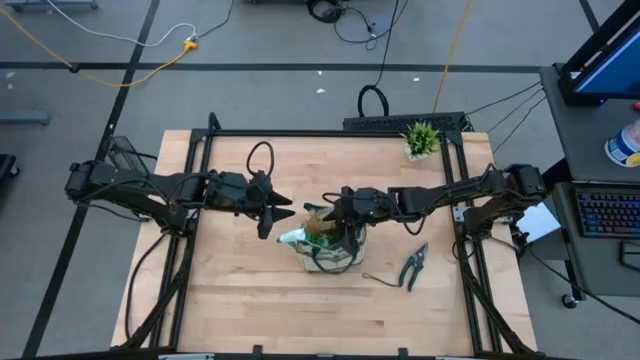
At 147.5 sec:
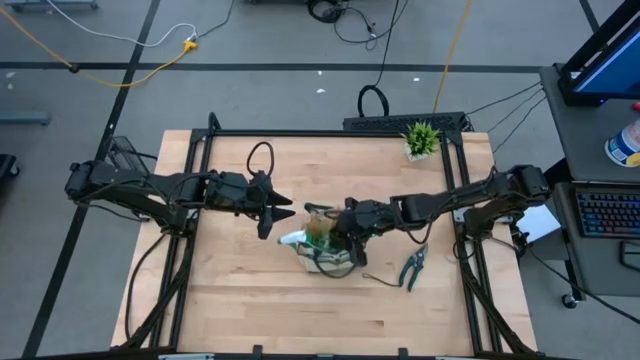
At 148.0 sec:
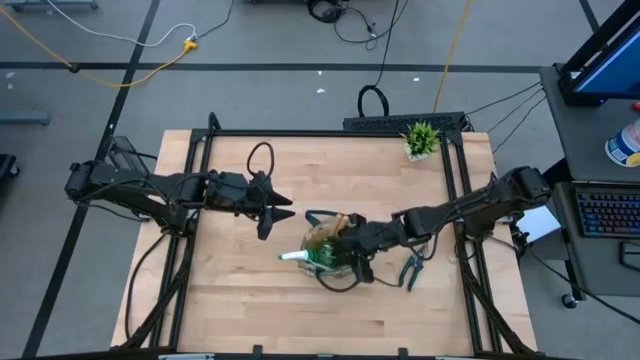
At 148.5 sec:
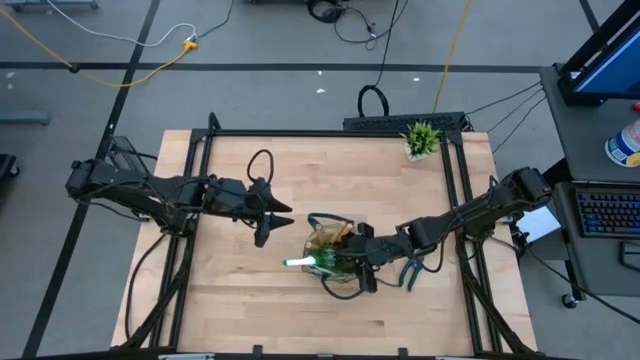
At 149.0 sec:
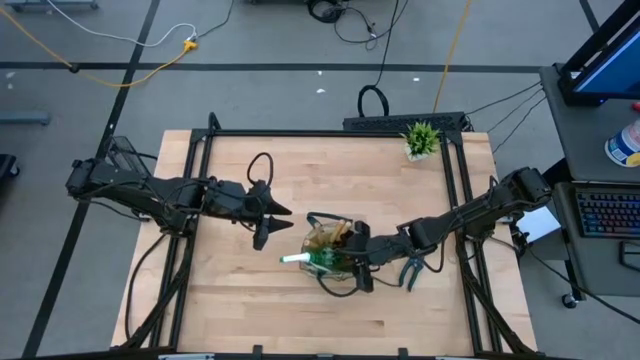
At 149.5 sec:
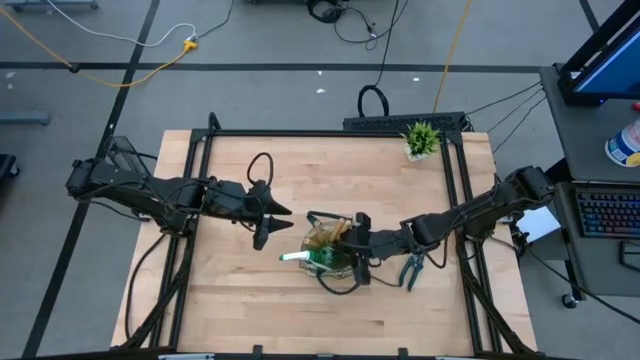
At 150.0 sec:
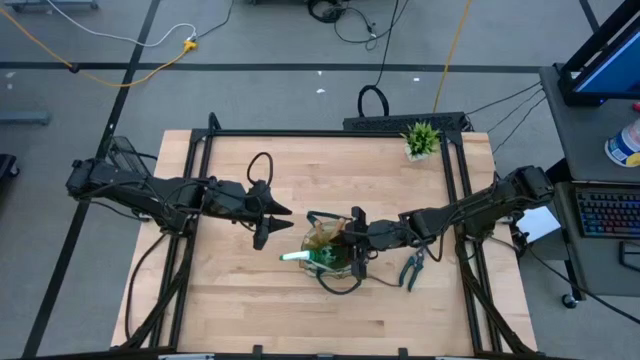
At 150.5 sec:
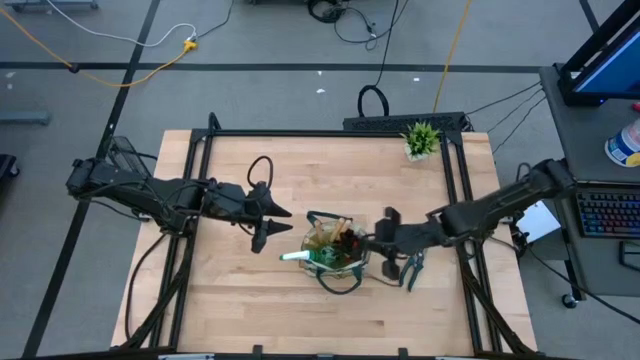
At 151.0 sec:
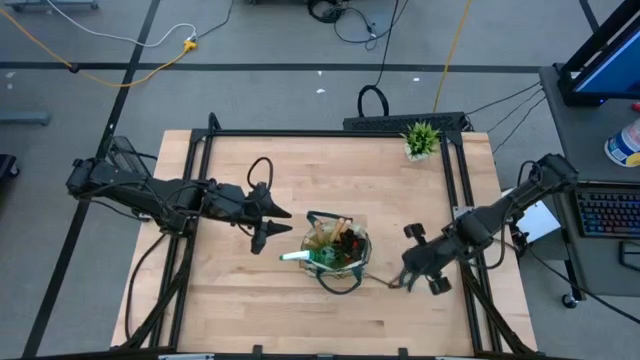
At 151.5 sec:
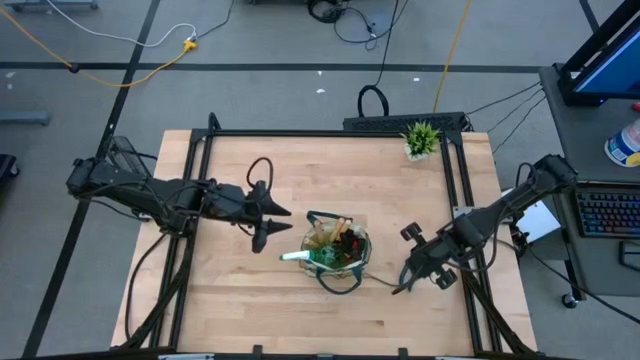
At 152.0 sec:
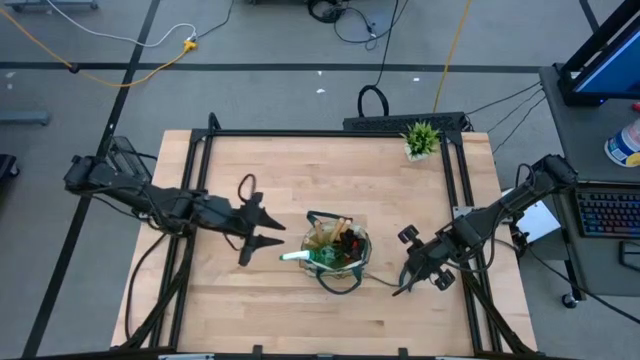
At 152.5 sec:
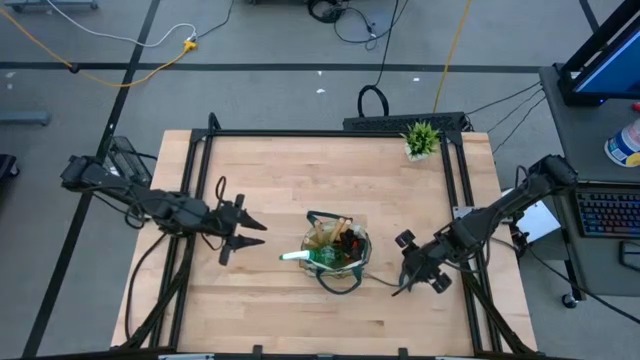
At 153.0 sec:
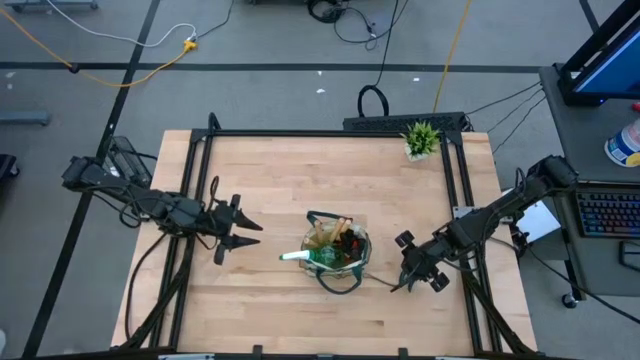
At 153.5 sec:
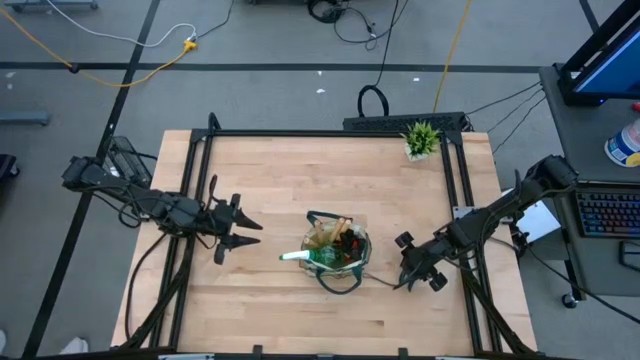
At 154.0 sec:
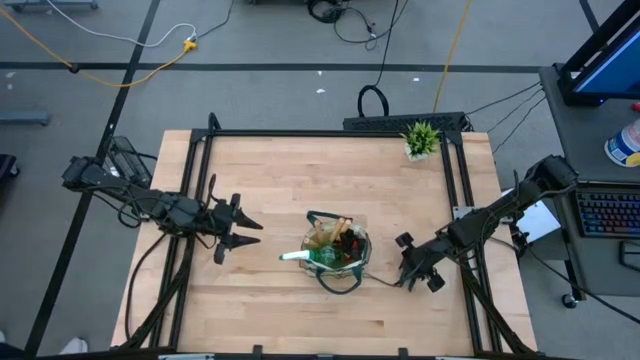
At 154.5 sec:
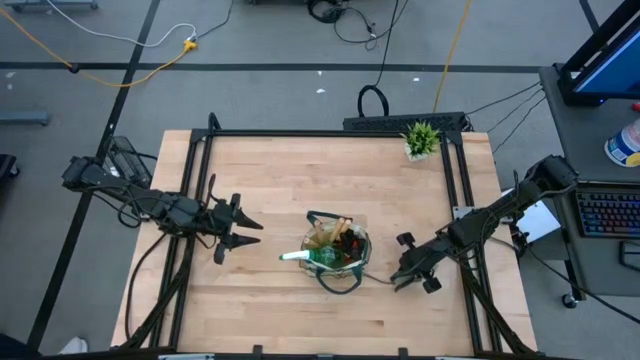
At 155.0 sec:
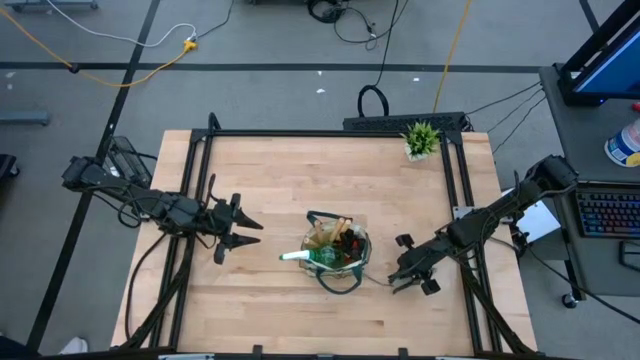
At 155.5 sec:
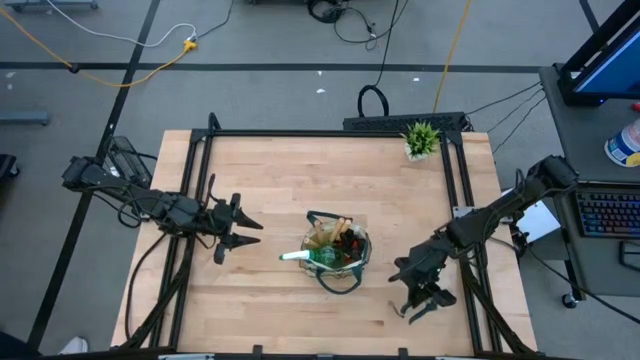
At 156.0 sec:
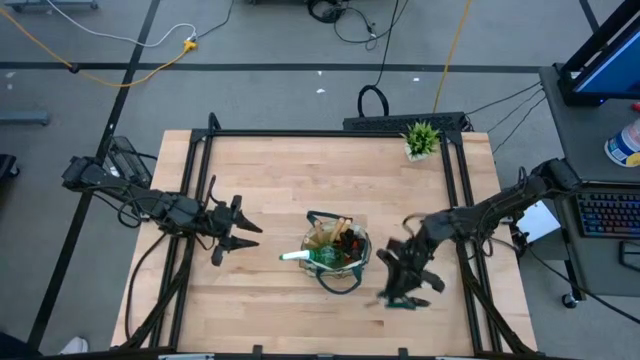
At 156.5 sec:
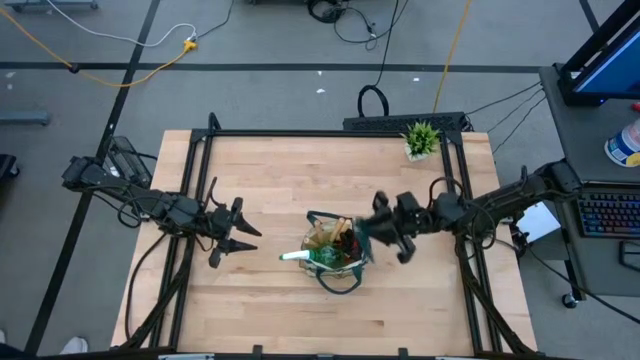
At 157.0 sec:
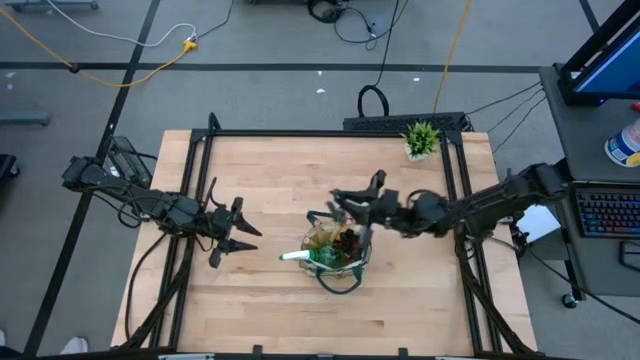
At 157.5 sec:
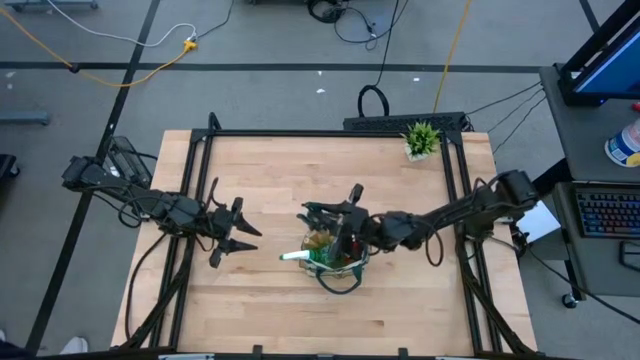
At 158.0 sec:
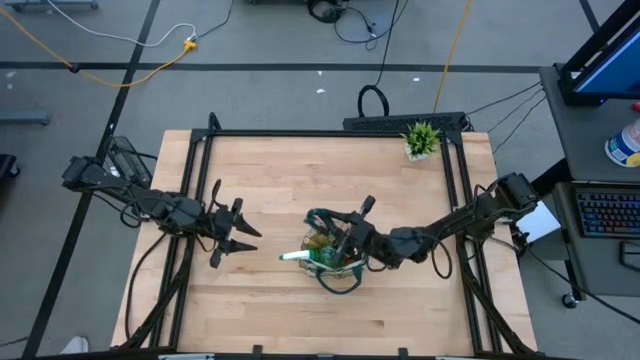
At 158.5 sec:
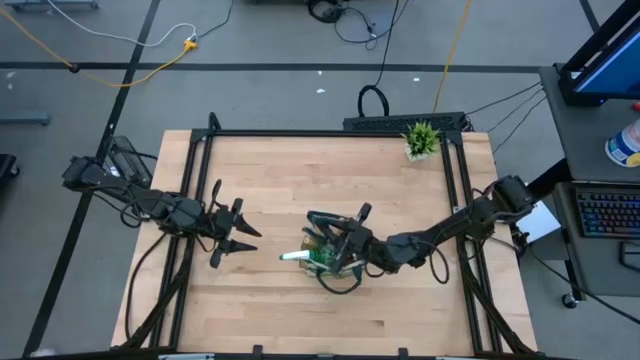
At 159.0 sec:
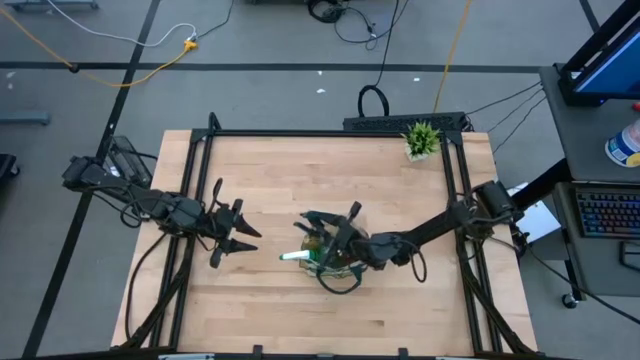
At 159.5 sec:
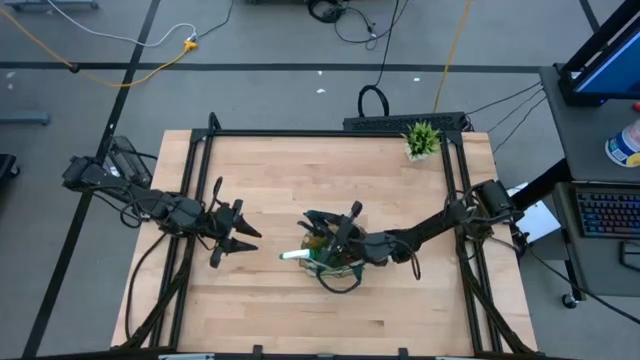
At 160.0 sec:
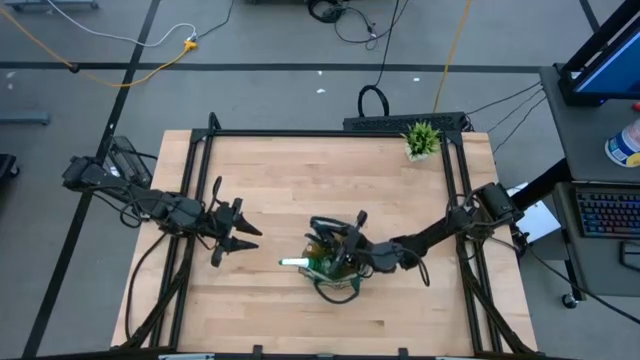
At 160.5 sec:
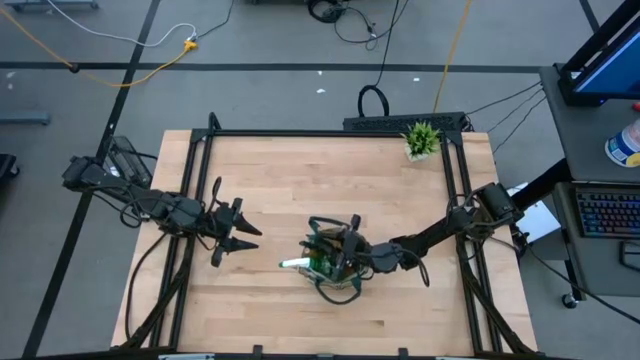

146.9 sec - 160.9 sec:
Task: Pick & Place Garden tools in Gardening bag
Put the shear scissors into the gardening bag

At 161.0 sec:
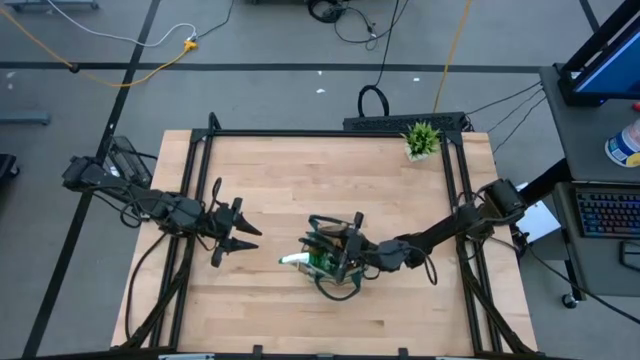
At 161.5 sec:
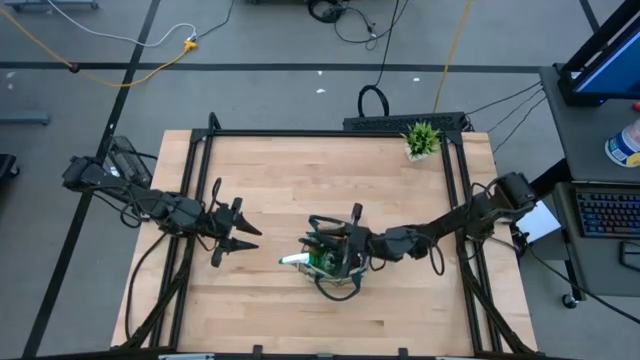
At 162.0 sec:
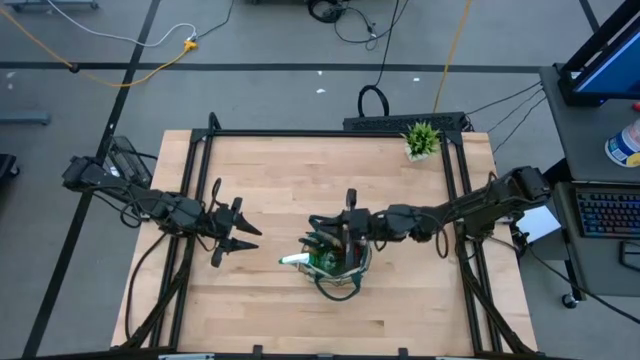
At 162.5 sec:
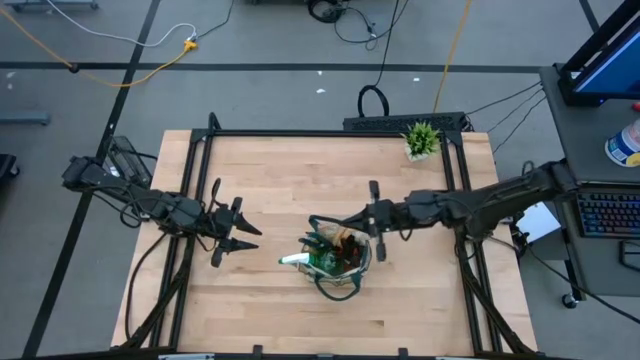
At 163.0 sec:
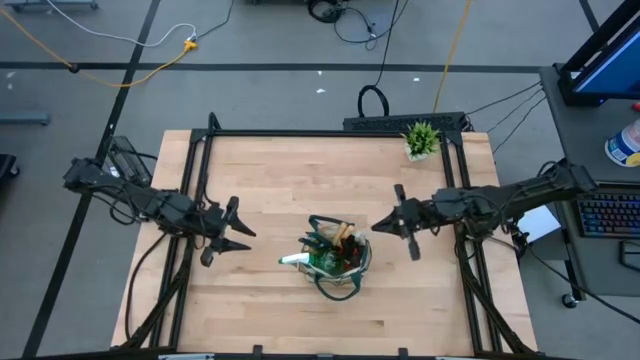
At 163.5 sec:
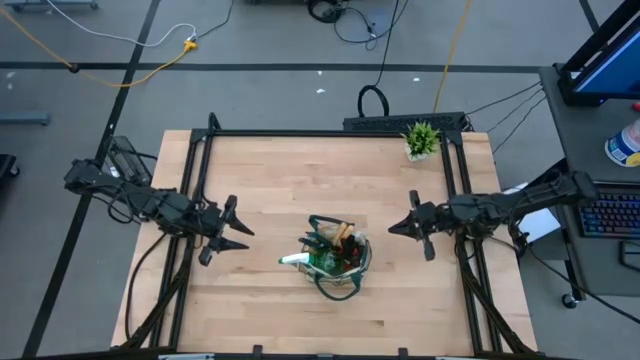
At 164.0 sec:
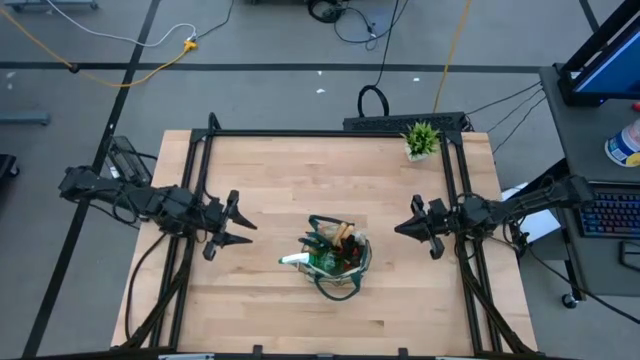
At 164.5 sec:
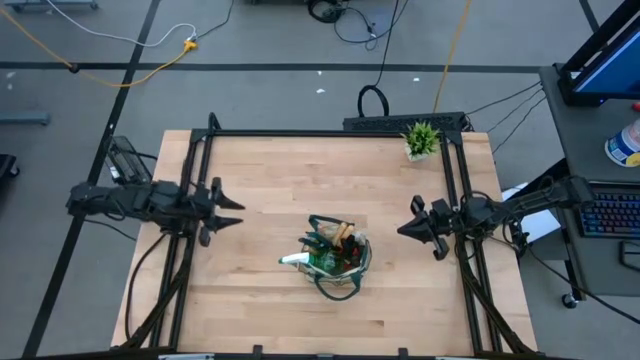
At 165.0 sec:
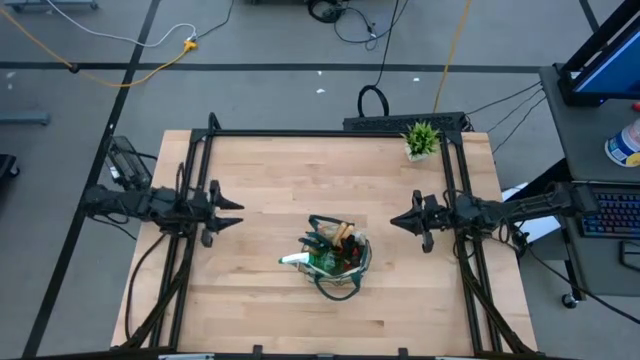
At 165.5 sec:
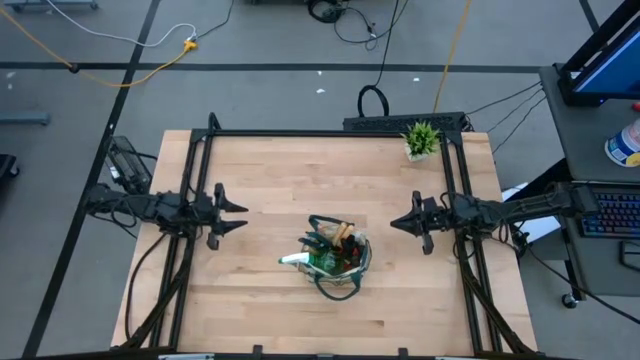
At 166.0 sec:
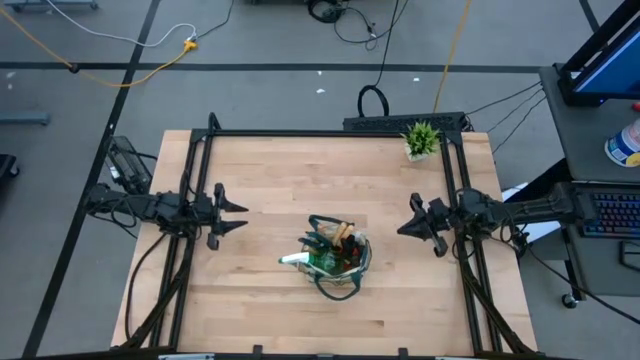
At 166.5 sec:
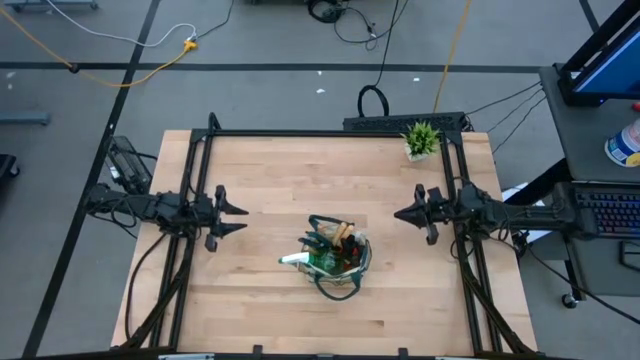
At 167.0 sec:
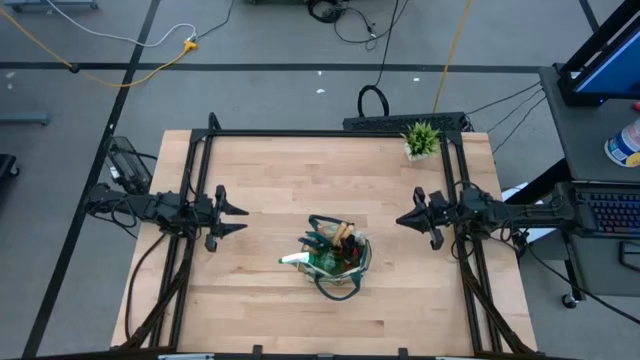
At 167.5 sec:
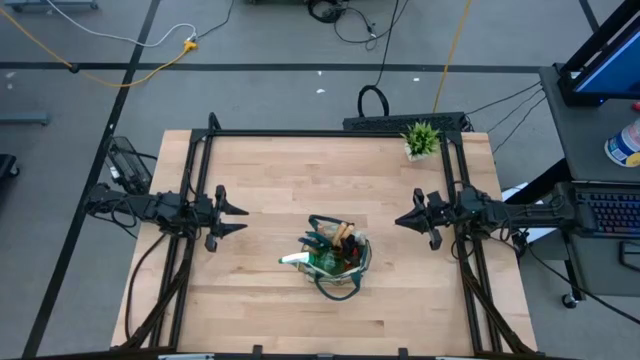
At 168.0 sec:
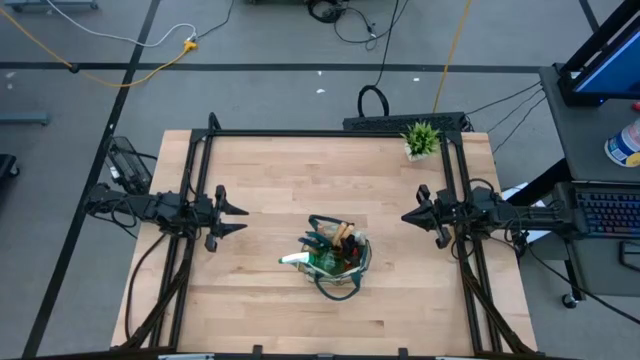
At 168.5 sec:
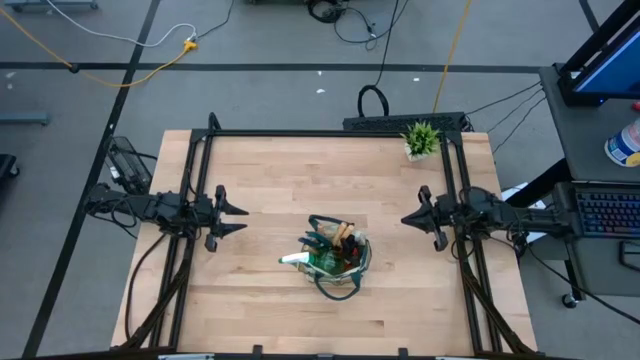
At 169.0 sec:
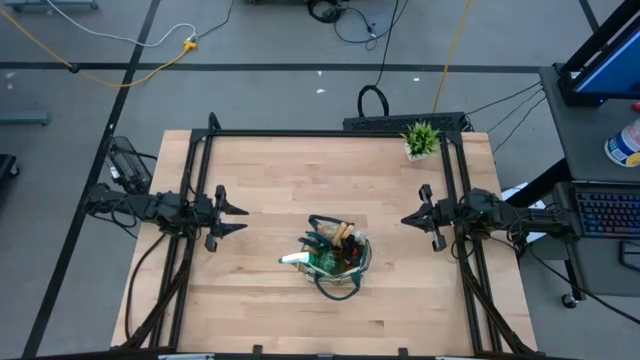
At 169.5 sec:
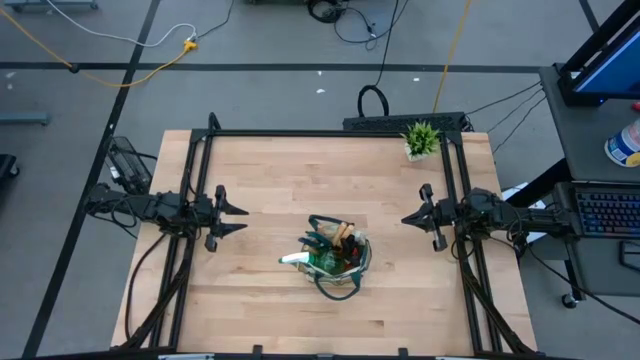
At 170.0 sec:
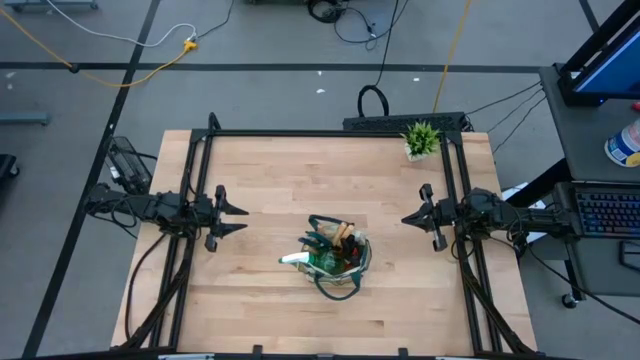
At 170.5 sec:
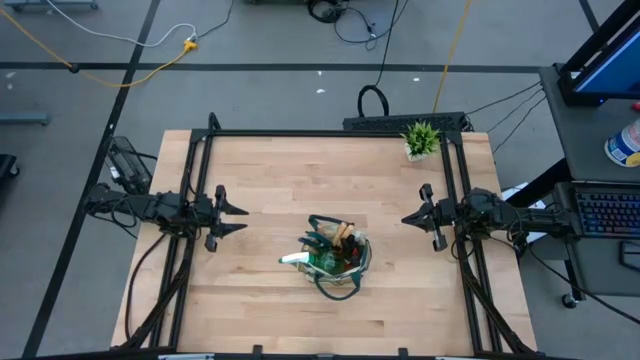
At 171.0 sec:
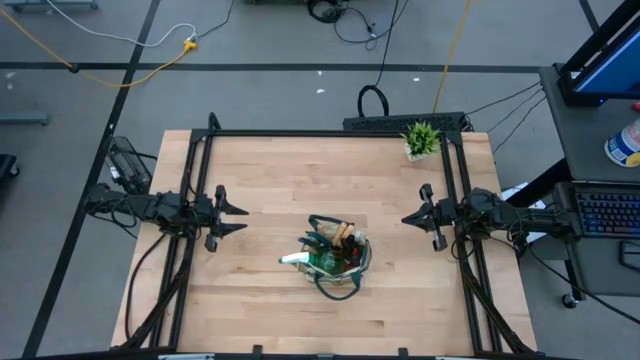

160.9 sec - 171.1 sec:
Return to Home Position
